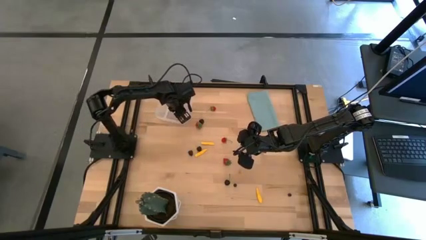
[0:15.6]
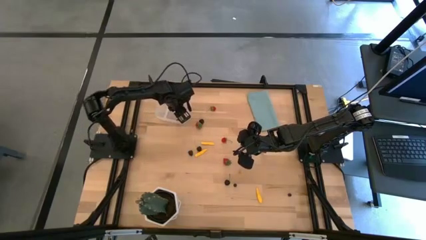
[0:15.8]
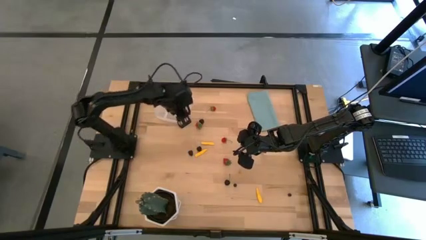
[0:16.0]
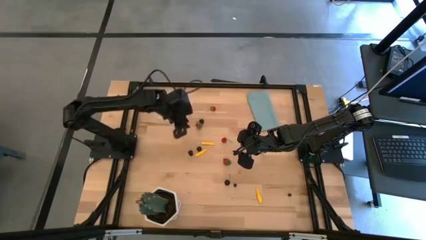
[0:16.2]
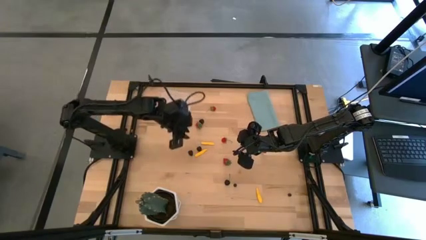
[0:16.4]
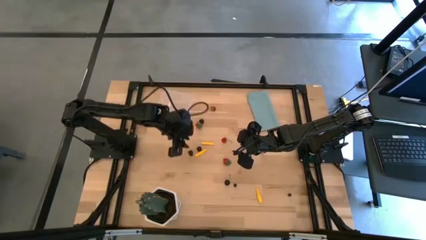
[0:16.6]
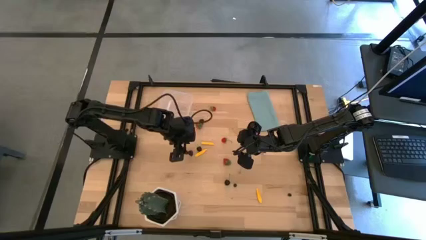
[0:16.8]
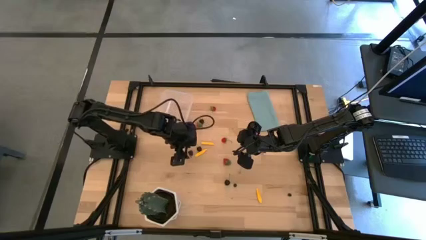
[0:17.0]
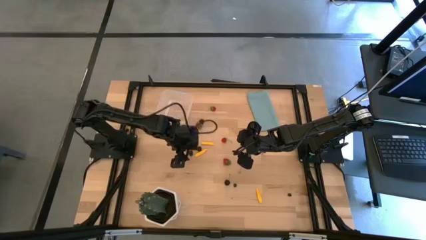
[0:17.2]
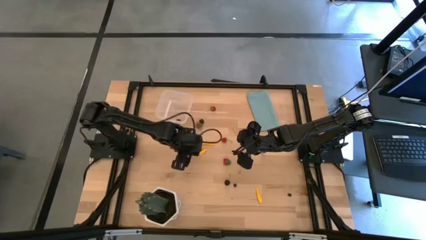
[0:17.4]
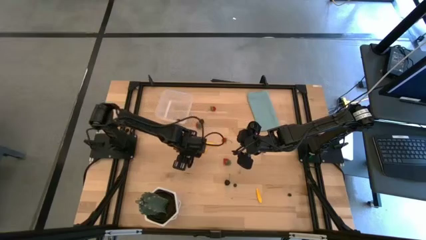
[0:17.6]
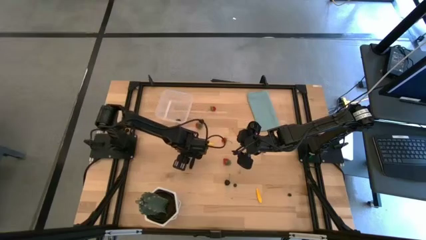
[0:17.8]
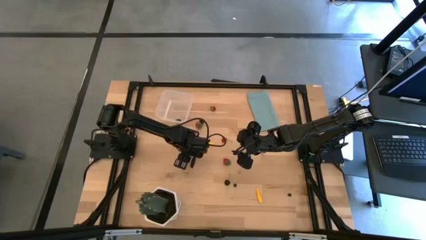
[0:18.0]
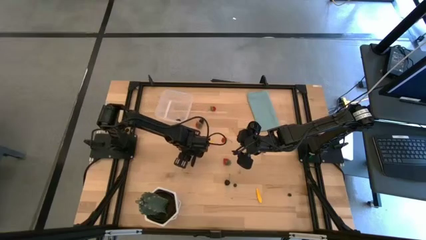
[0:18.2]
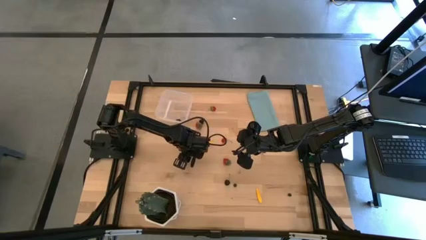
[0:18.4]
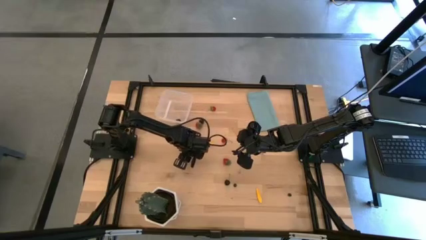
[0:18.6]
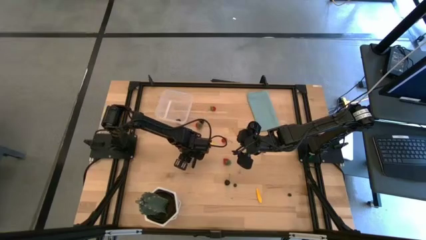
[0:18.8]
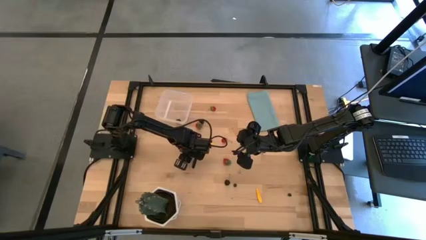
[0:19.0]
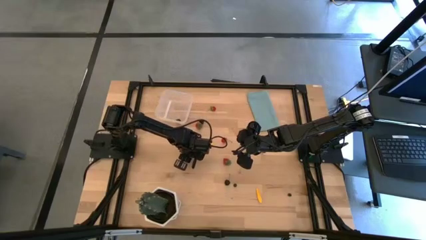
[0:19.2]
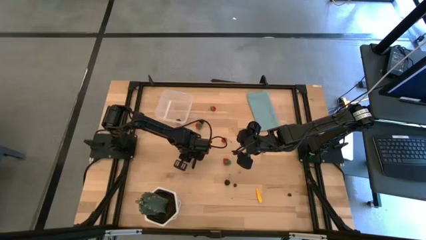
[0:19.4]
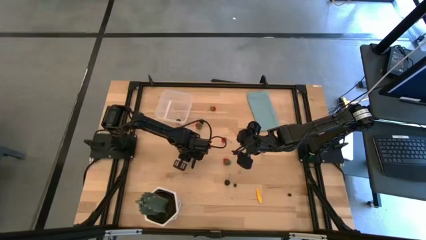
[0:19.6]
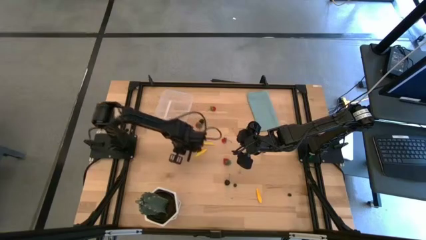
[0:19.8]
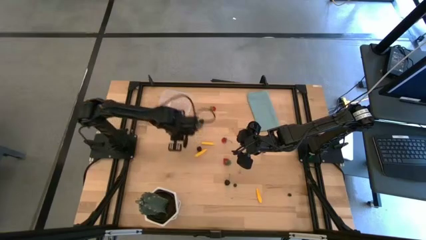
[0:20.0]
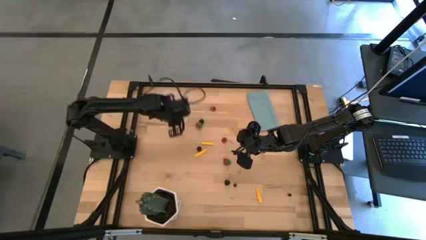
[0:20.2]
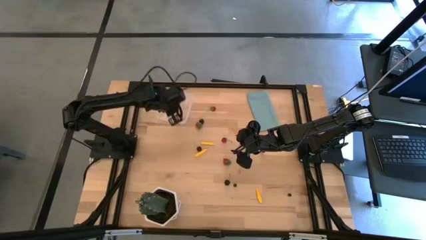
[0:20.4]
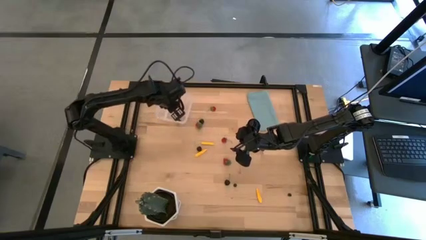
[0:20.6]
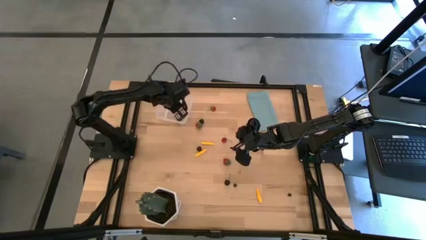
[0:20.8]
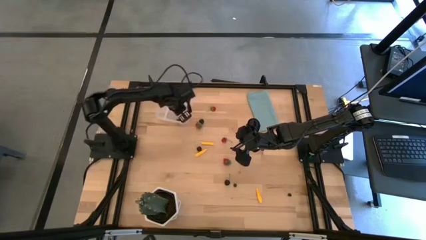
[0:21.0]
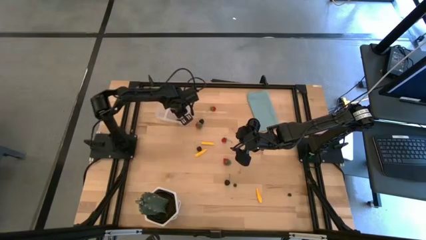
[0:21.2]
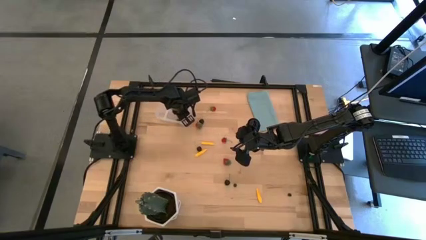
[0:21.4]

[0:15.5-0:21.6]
Task: Pick and placing Produce into tupperware
Put the blackberry into the transparent bin

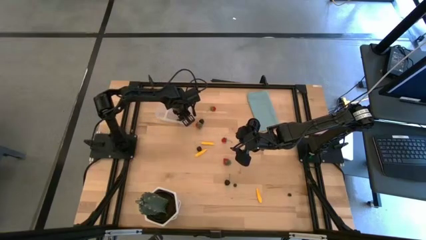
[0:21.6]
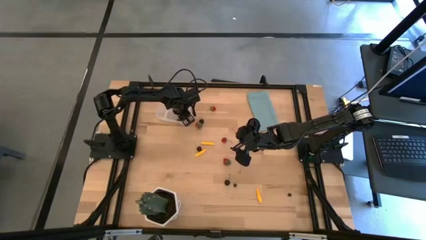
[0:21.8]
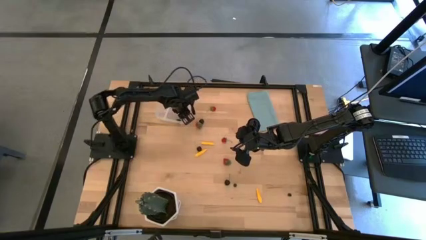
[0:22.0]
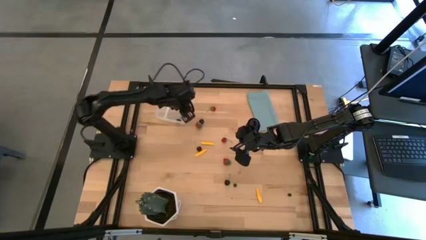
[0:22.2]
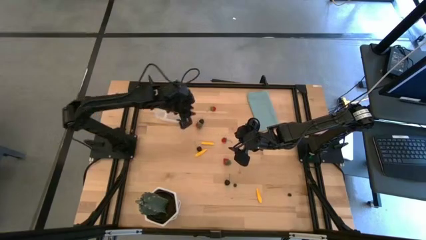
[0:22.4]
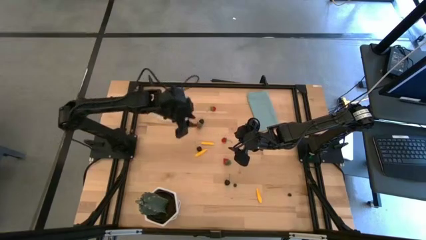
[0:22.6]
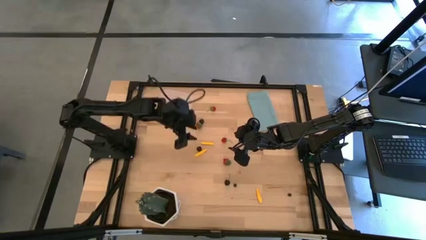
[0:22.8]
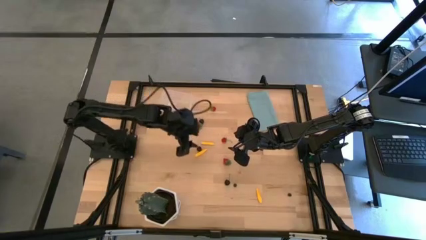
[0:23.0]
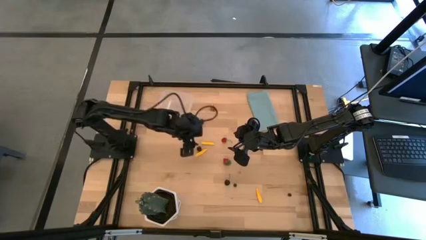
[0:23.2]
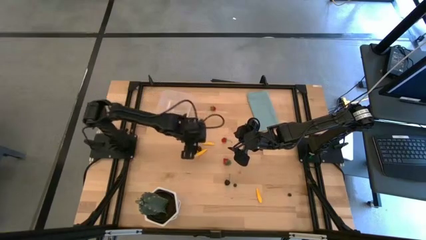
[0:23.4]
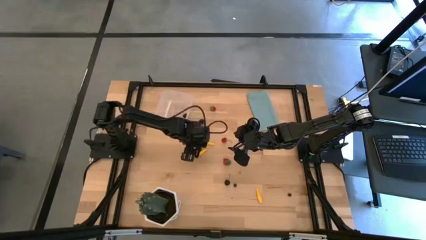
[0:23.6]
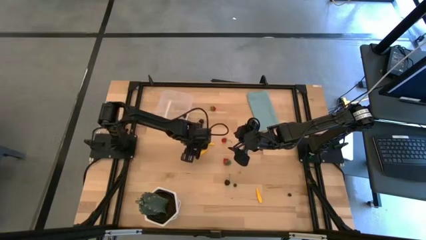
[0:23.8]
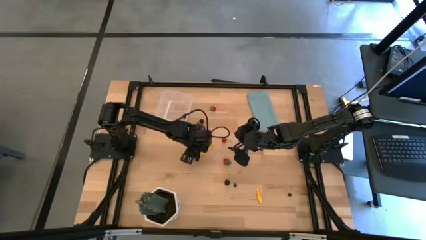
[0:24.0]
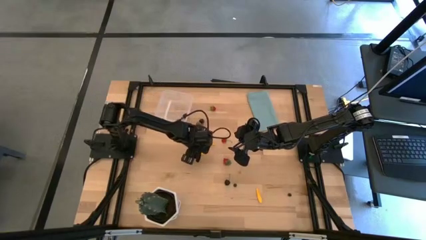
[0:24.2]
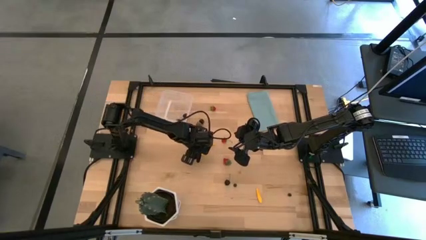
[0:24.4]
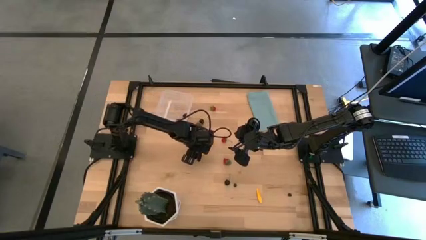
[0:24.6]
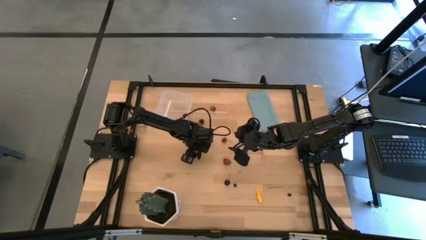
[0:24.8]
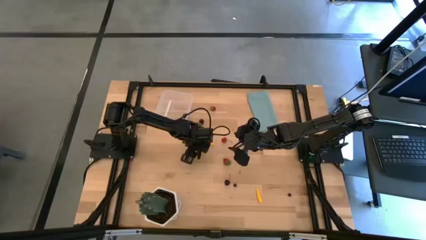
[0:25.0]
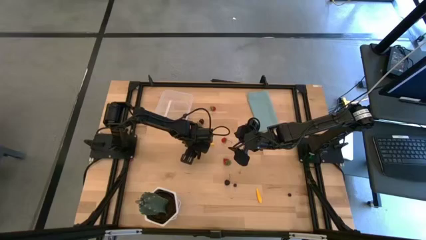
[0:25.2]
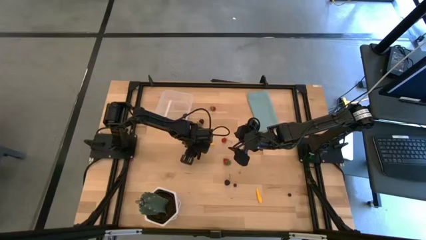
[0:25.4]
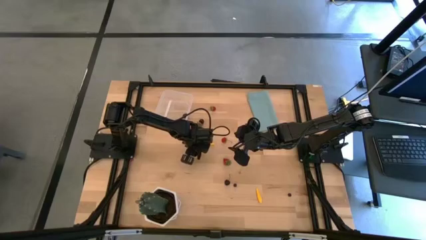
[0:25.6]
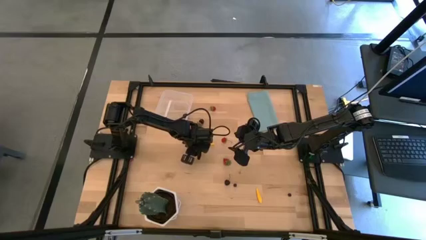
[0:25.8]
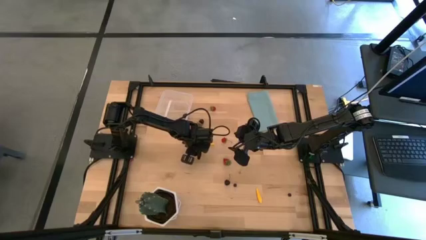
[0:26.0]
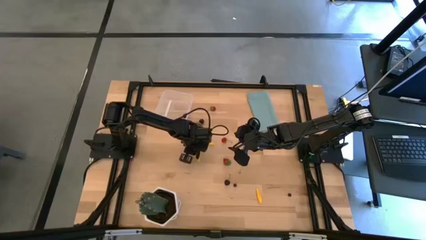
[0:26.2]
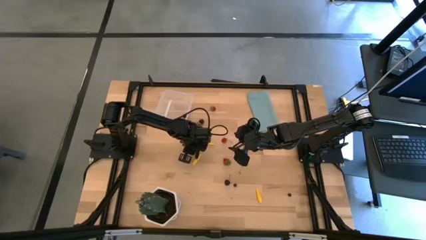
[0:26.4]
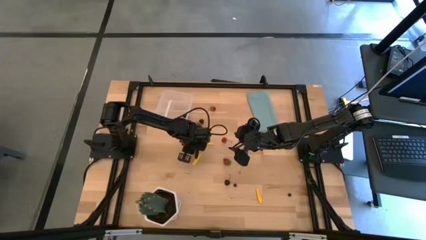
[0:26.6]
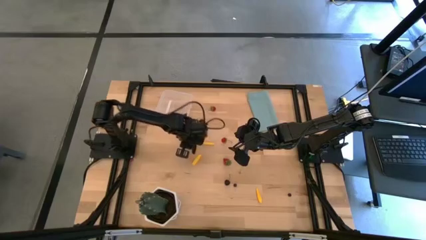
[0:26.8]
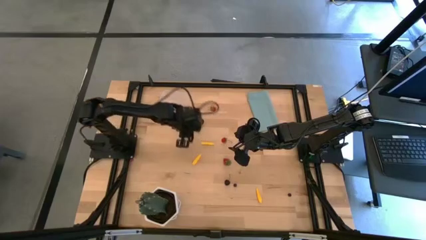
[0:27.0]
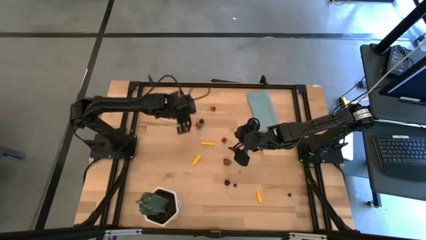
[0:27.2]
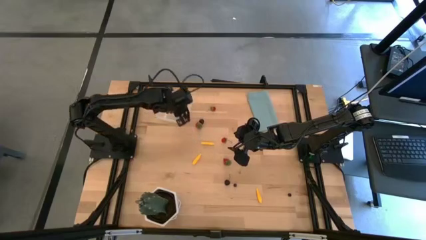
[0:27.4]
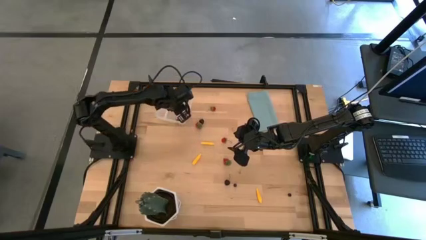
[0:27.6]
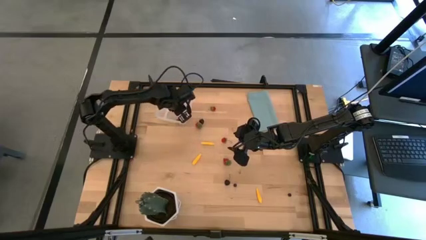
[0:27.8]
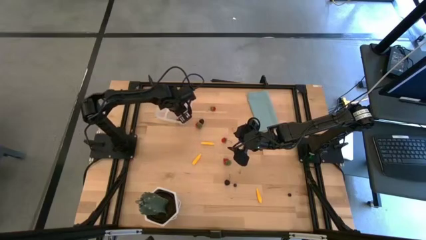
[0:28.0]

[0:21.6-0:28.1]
Put the black cherry into the transparent bin

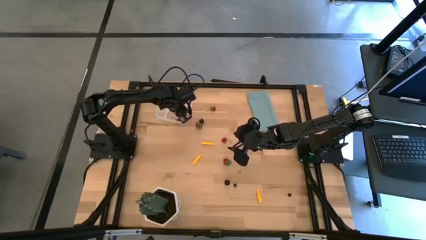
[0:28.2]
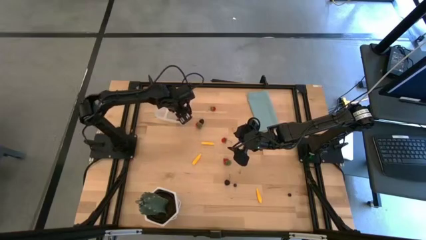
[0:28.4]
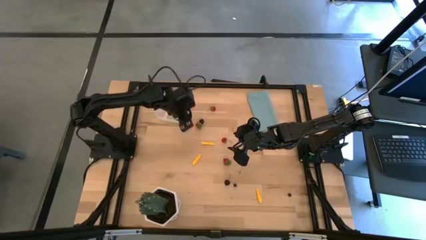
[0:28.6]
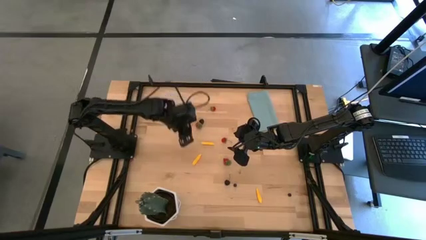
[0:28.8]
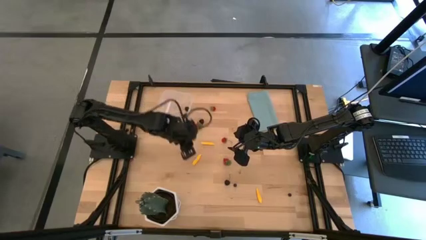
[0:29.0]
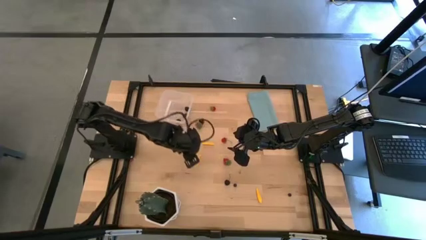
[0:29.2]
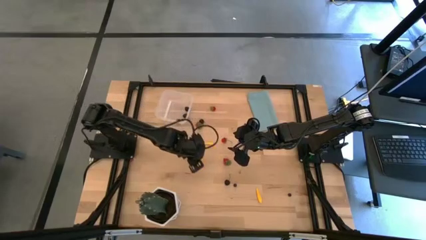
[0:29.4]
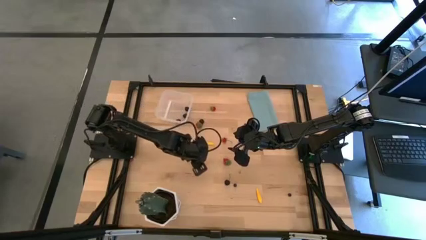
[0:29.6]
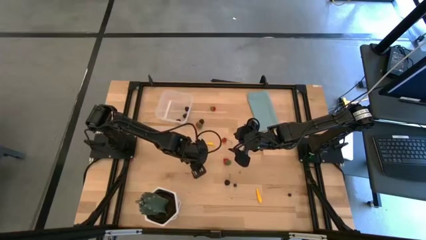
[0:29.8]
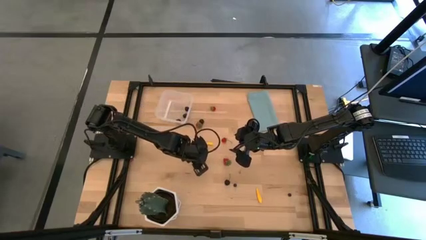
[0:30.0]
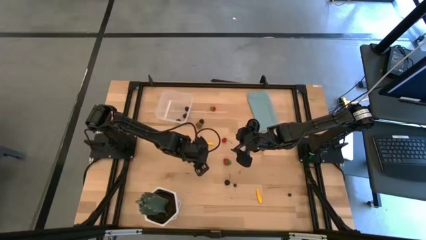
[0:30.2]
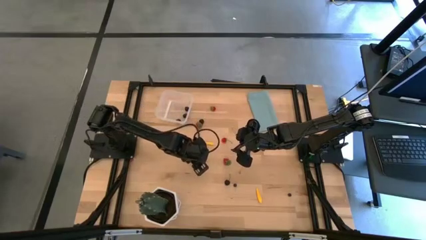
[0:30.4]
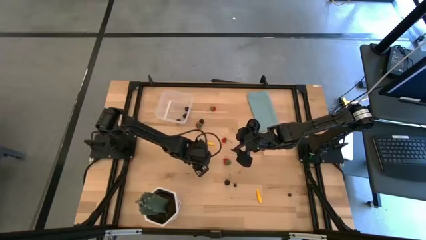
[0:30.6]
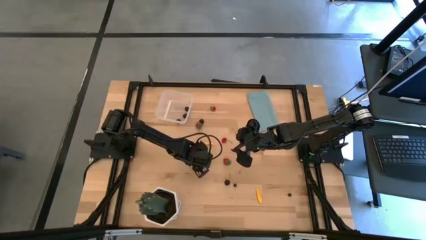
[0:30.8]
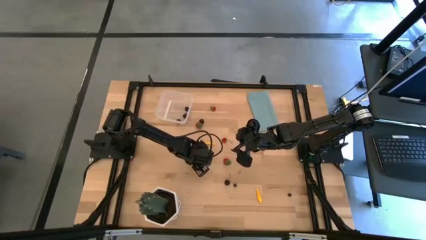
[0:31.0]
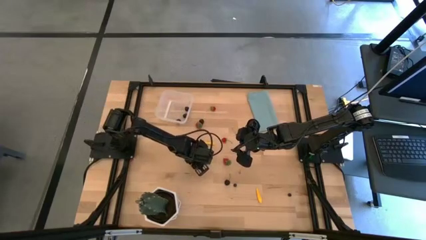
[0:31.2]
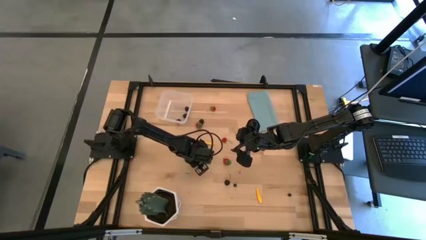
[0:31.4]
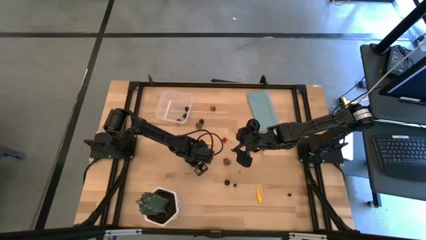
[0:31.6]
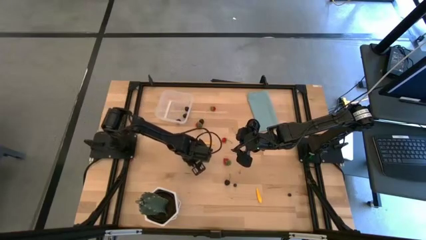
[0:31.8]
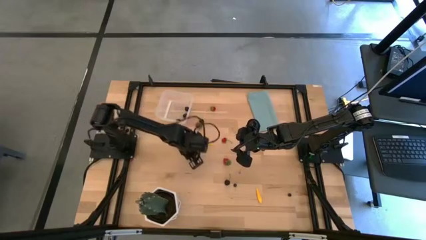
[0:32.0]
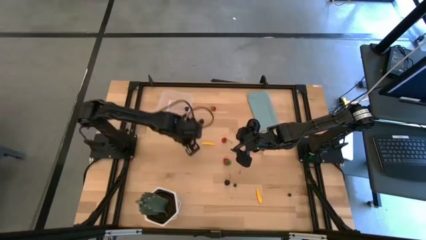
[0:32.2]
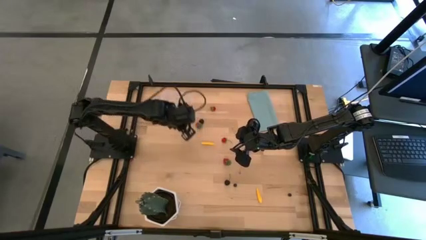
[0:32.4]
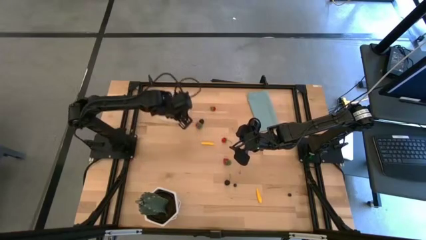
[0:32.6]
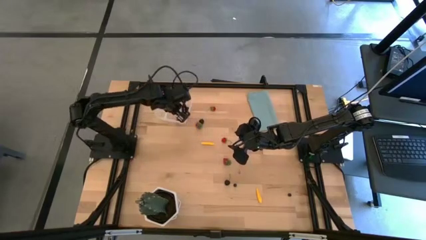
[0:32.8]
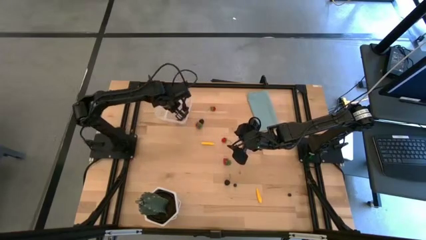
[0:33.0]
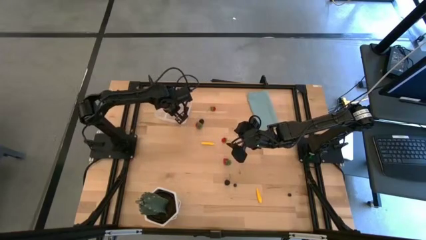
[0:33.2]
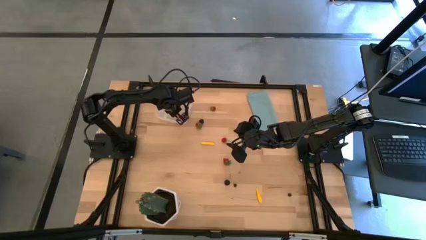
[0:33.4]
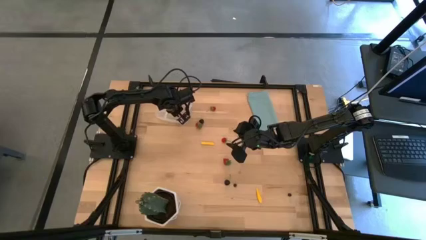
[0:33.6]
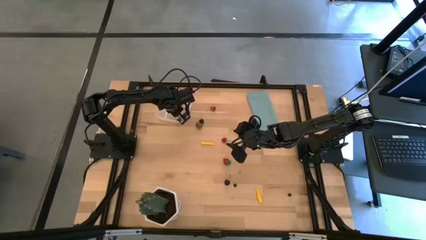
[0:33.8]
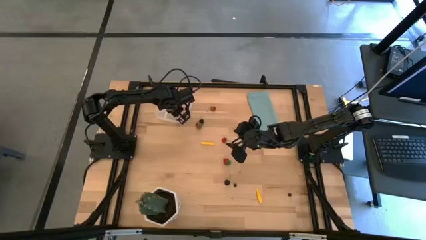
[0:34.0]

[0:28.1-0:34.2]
Put the yellow corn into the transparent bin
